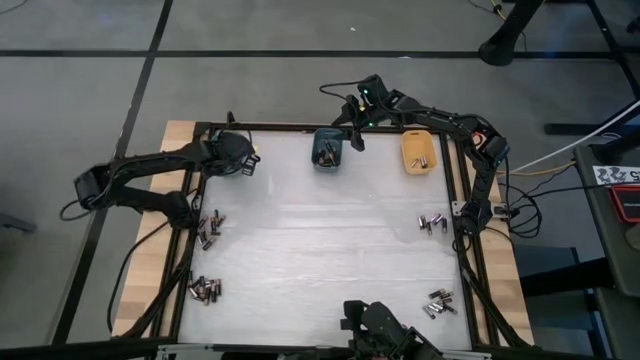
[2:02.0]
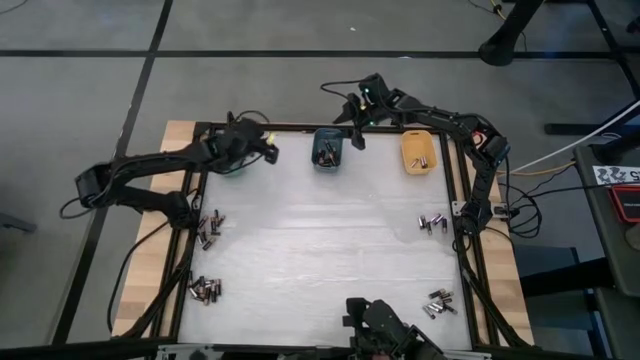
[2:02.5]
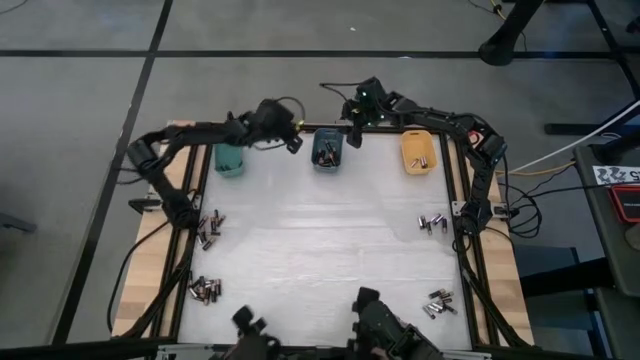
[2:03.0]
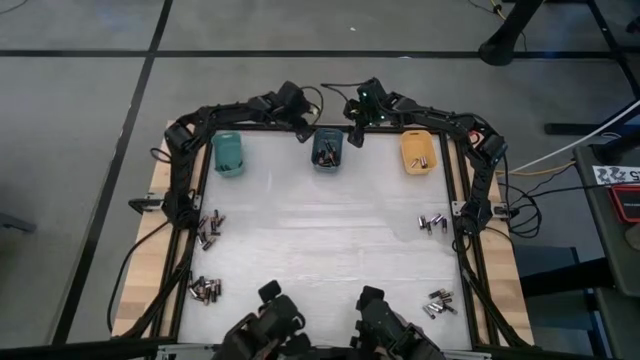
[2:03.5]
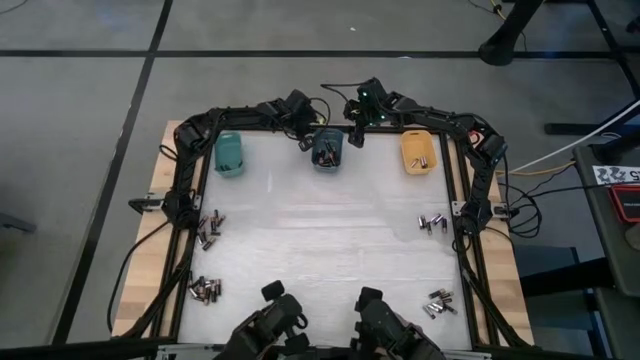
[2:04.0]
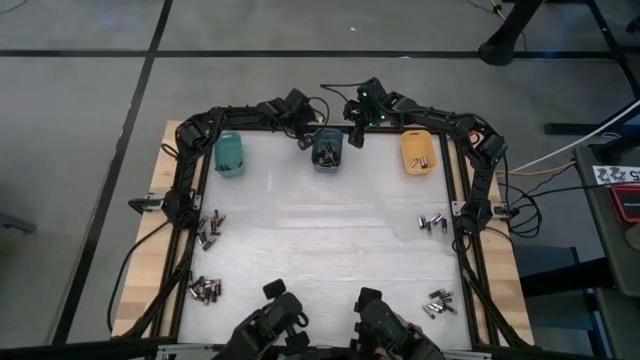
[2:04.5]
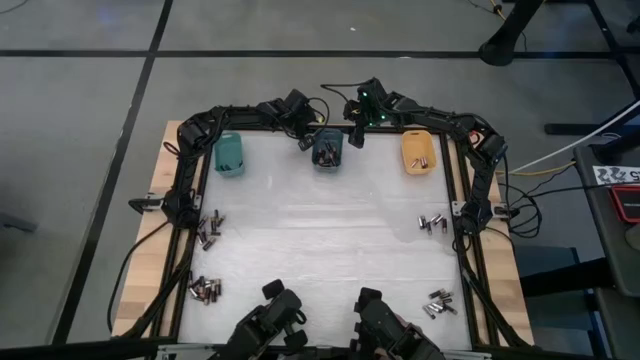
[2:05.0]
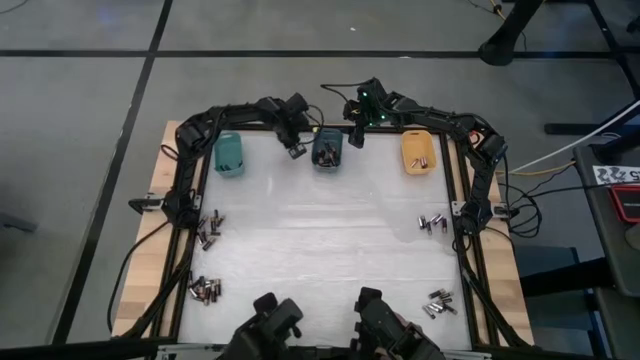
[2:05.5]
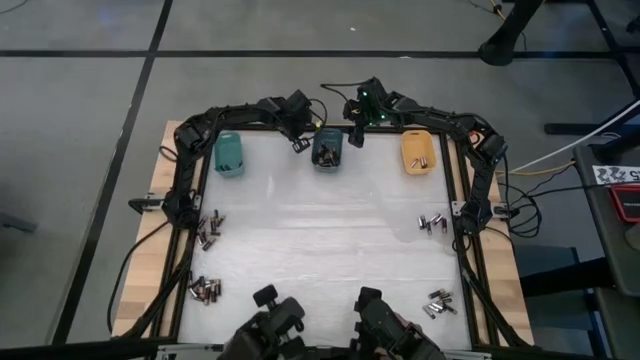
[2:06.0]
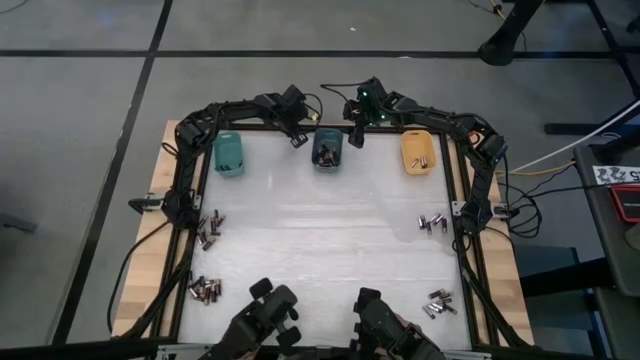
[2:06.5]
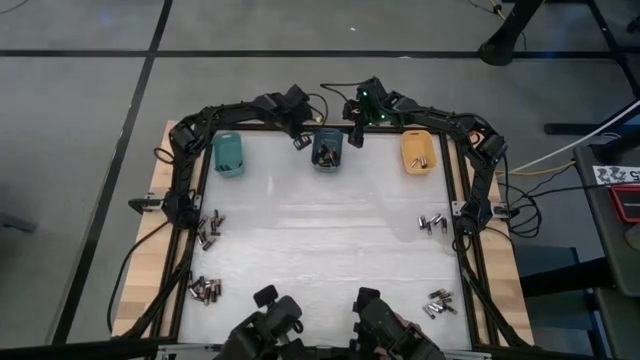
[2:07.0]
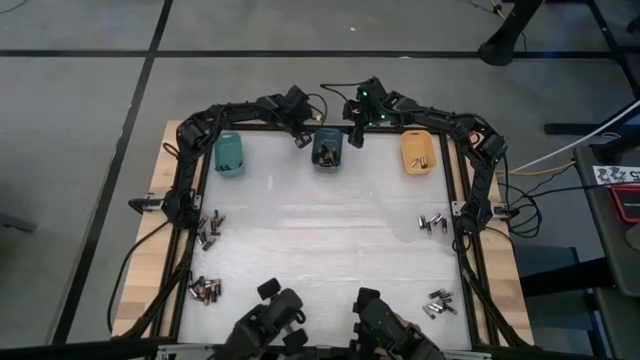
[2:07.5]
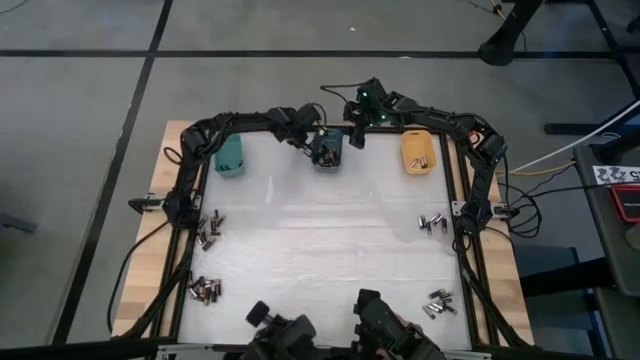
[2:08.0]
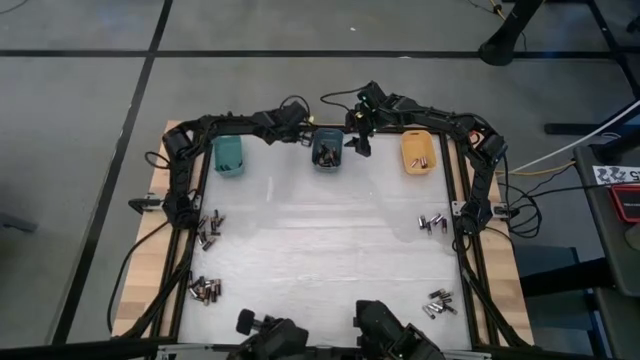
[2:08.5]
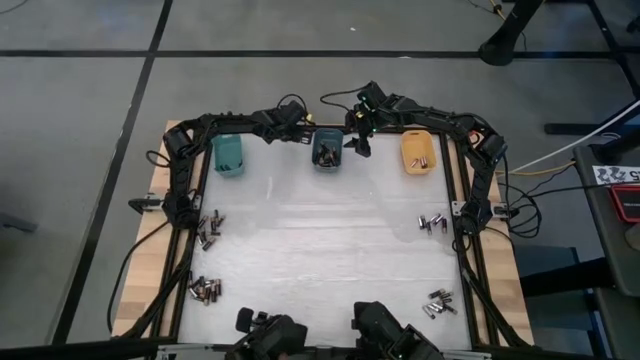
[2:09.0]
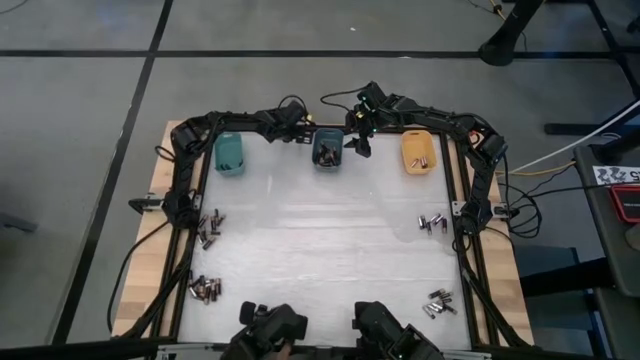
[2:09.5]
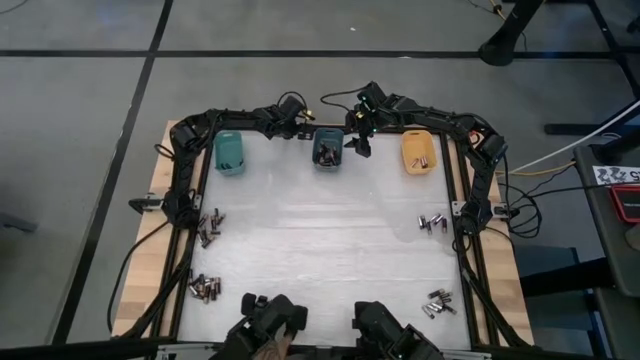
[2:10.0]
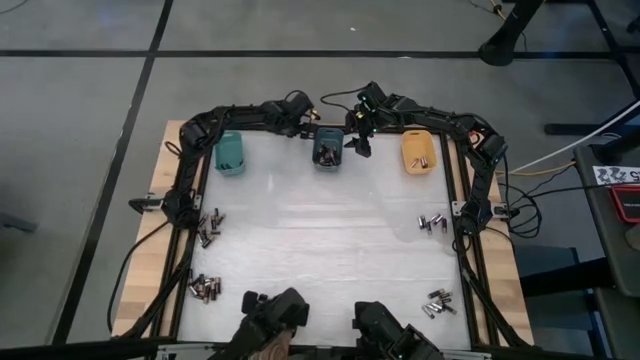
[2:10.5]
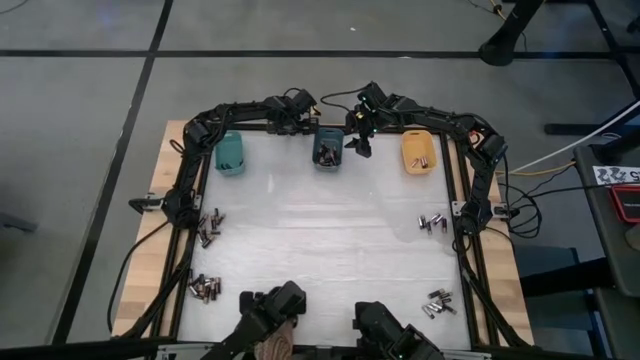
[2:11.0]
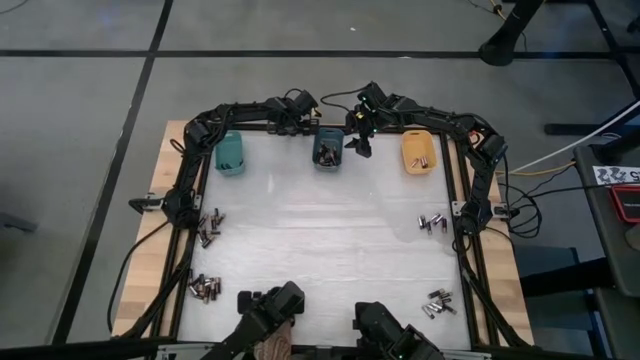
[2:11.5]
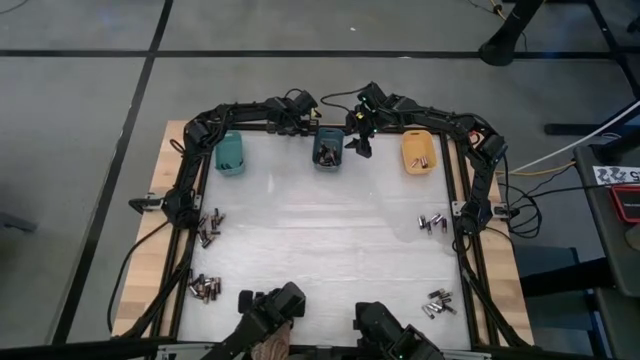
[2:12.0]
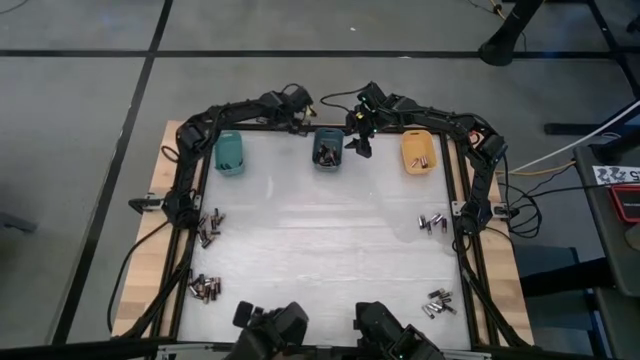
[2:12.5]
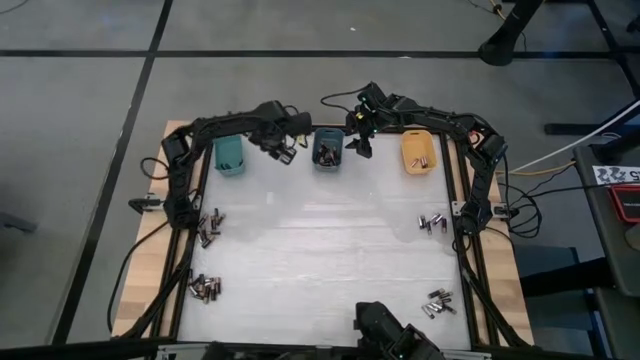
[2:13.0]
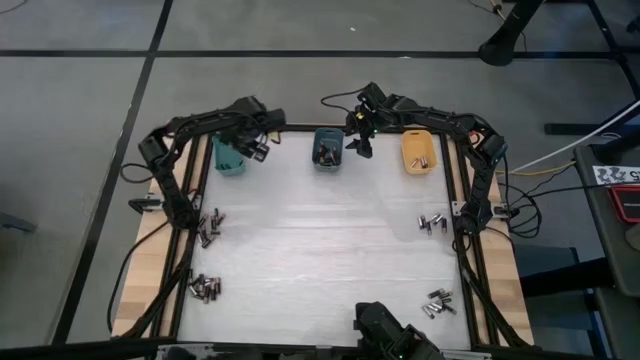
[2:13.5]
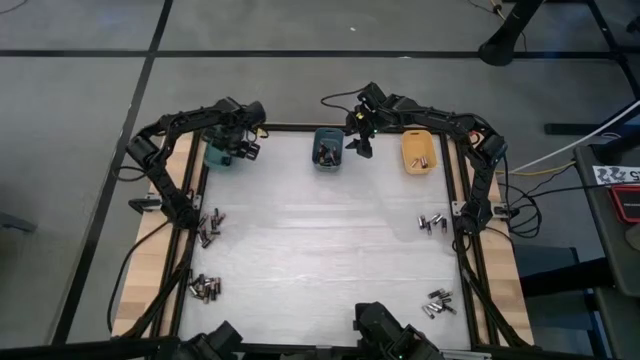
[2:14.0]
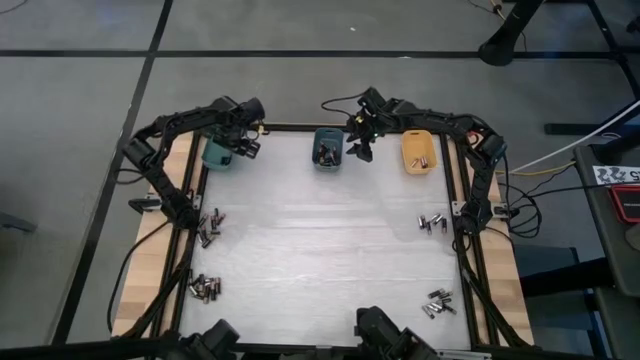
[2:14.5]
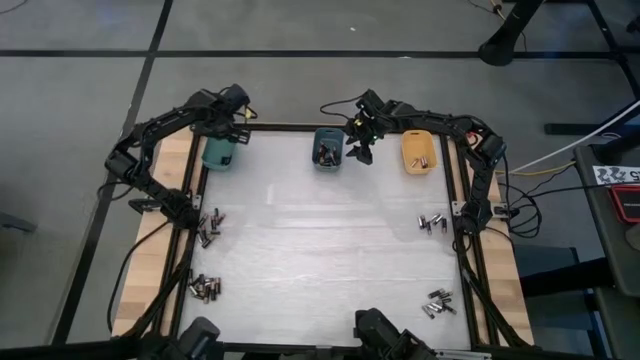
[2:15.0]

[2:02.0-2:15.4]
Task: Sort batteries
Put the brown battery into the green bin

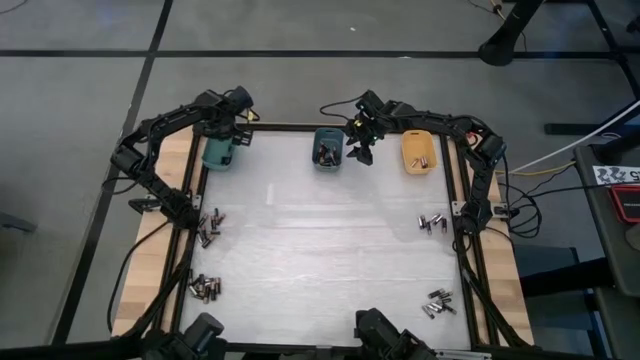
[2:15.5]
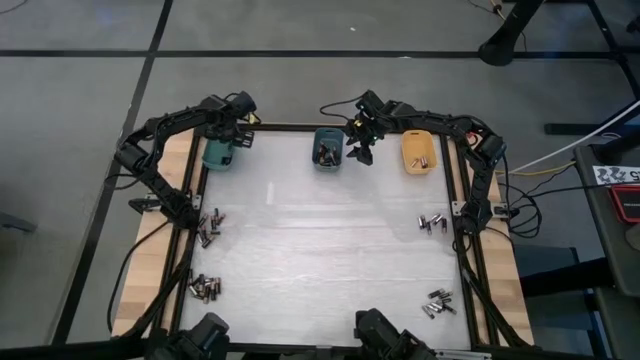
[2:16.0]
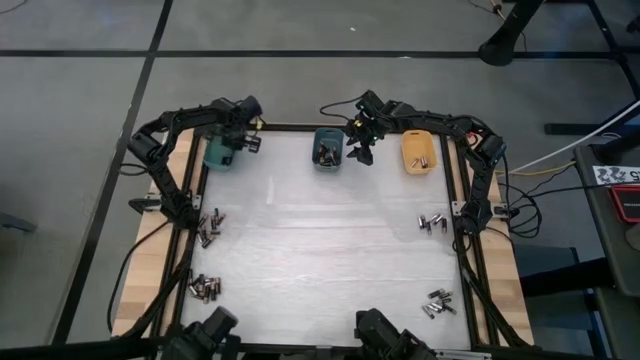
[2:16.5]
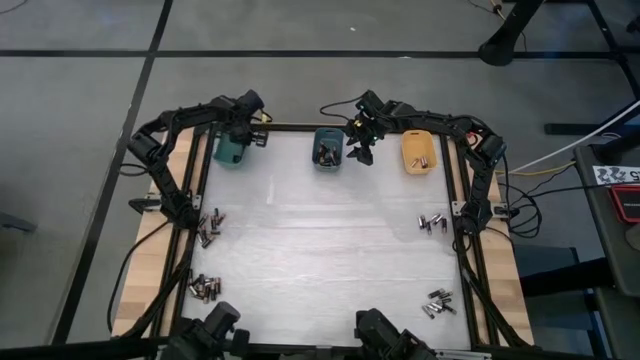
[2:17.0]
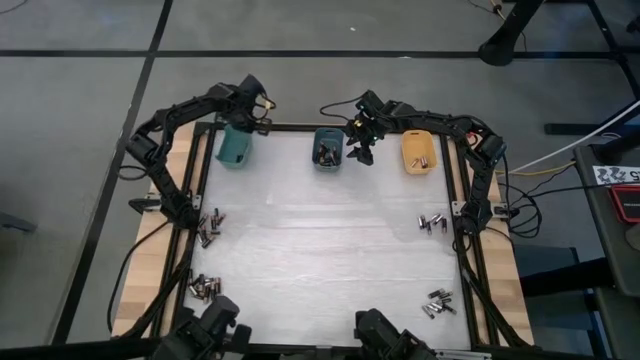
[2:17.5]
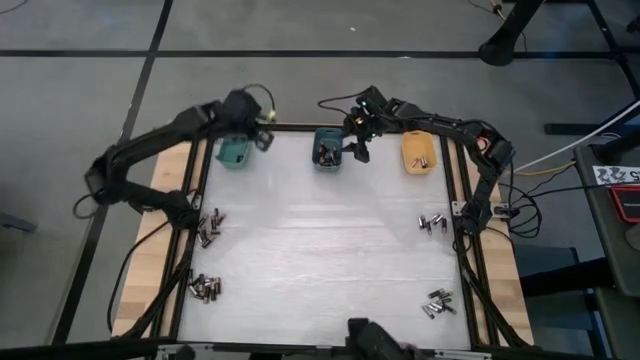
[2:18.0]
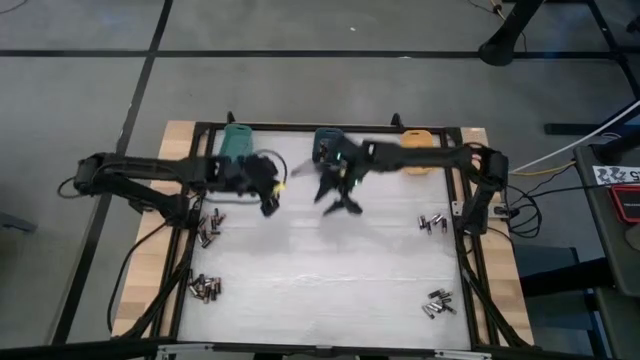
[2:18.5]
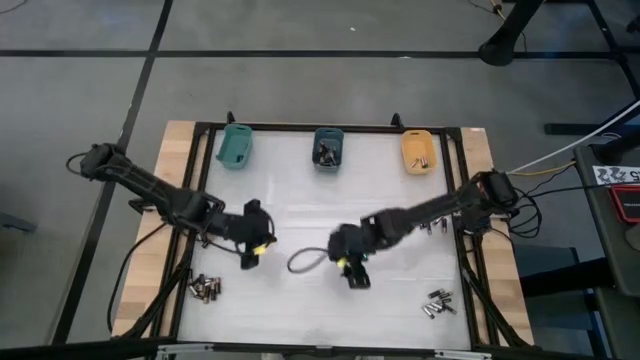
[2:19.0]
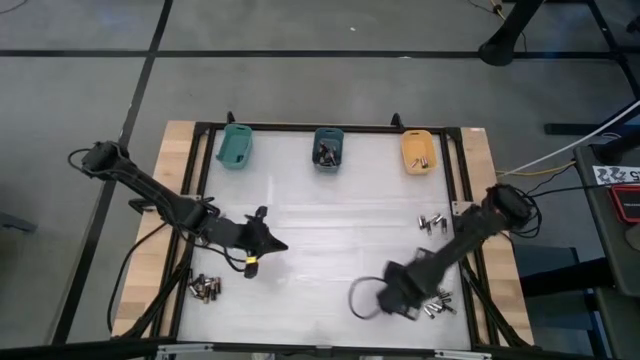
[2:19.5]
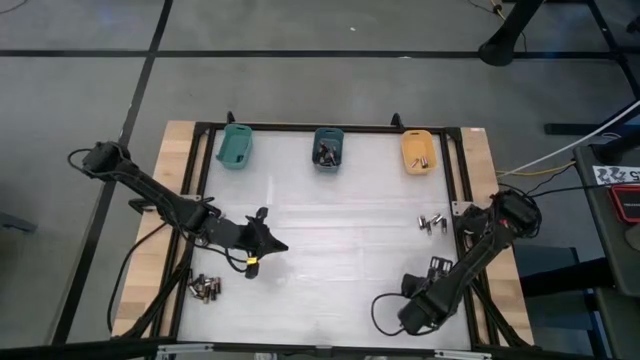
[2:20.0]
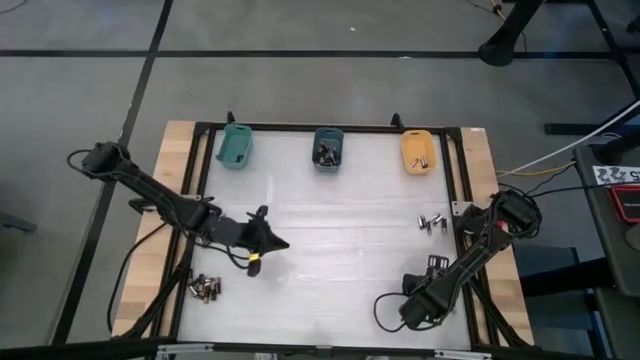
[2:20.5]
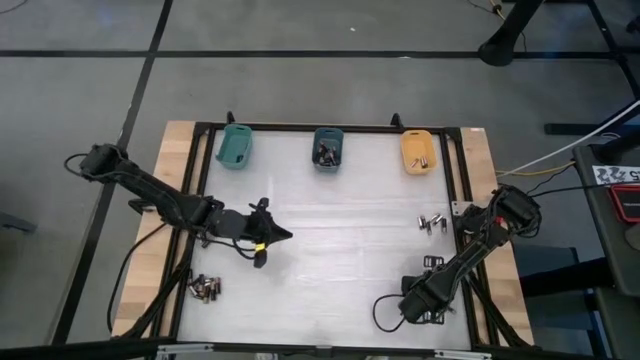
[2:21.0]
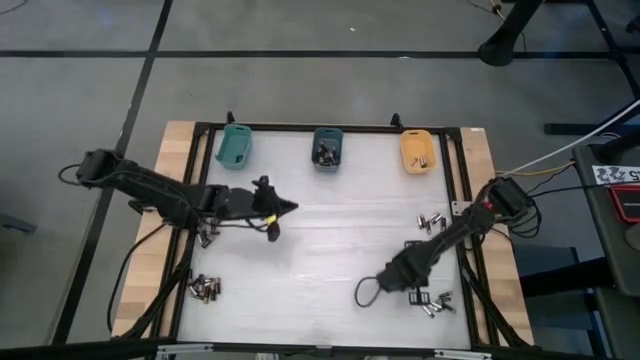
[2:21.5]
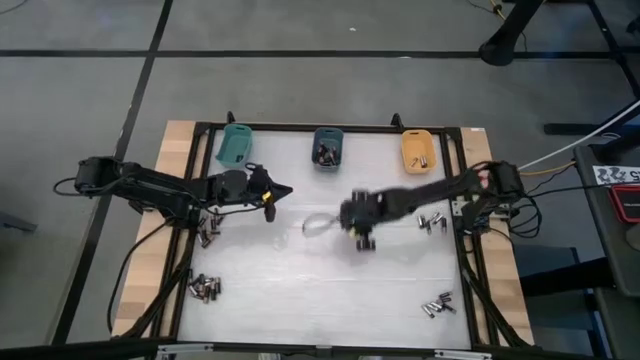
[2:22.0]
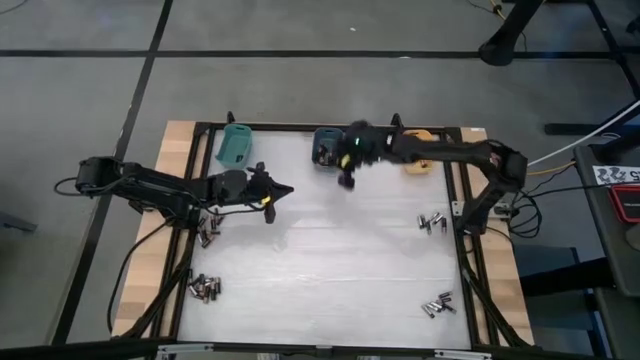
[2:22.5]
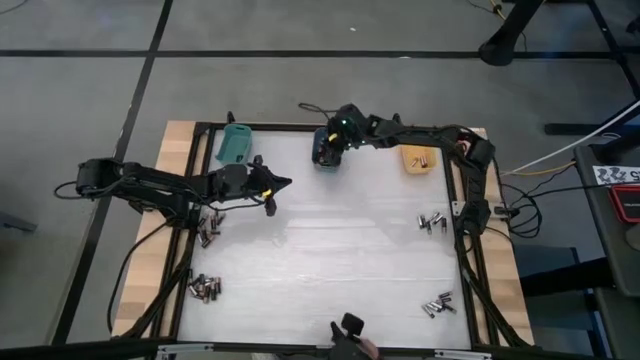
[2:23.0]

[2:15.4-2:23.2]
Put the brown battery into the blue bin

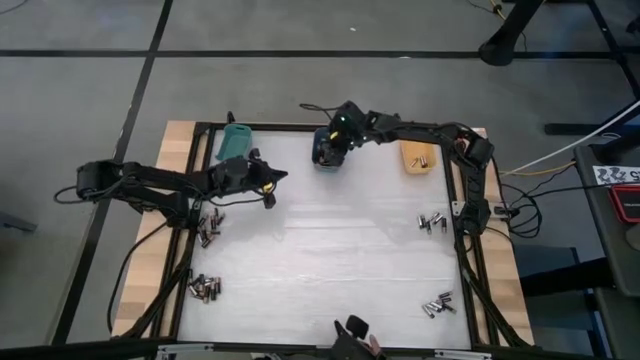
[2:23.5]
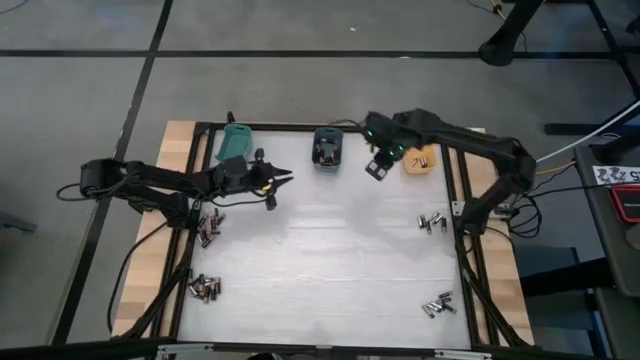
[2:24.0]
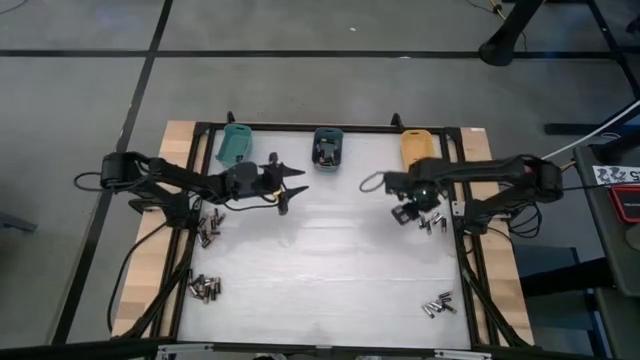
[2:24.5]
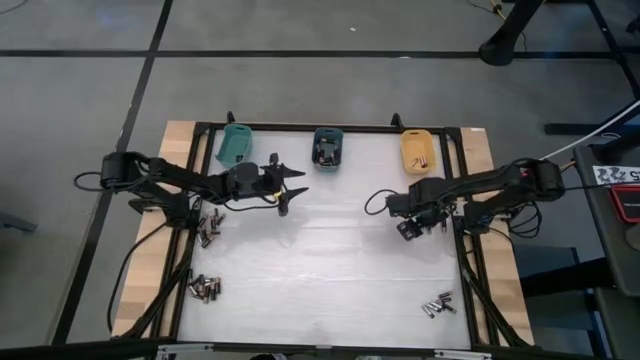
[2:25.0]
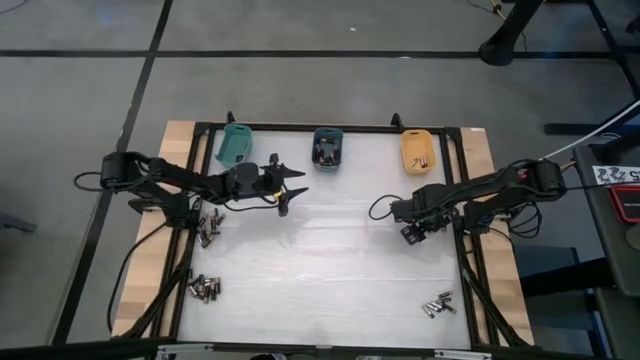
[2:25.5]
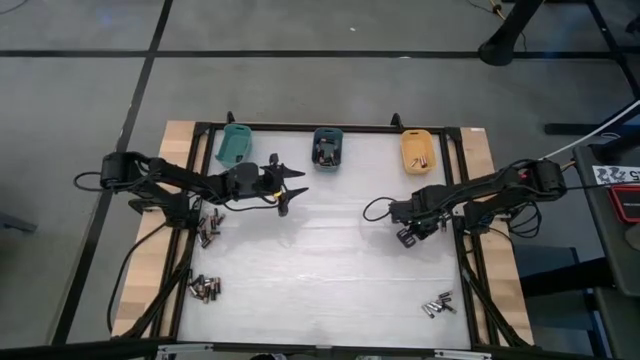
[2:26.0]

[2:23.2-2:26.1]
Put the silver battery into the yellow bin
